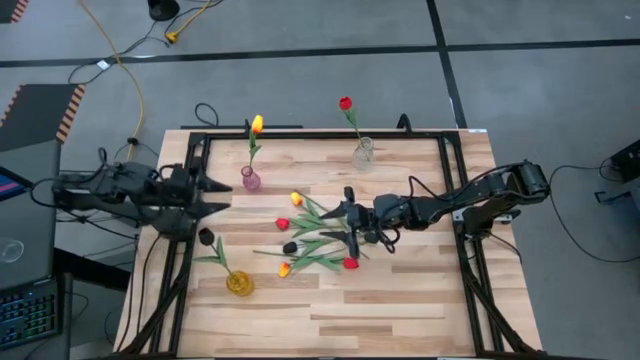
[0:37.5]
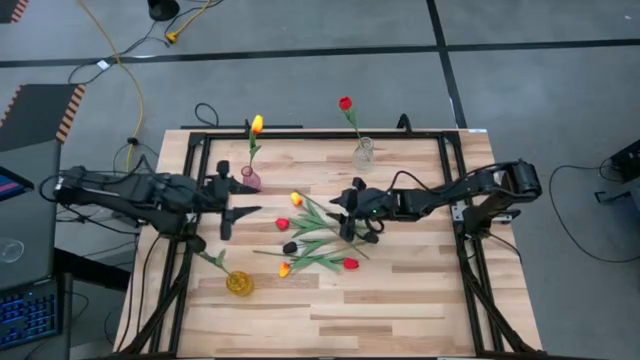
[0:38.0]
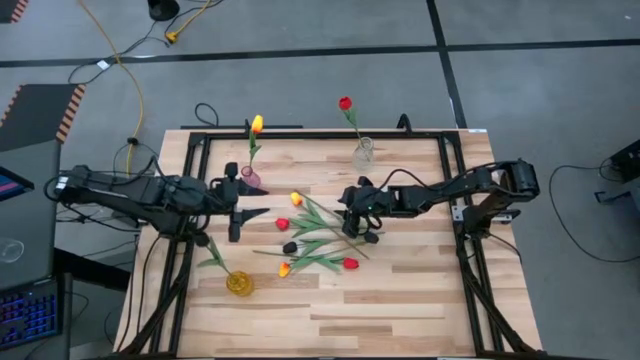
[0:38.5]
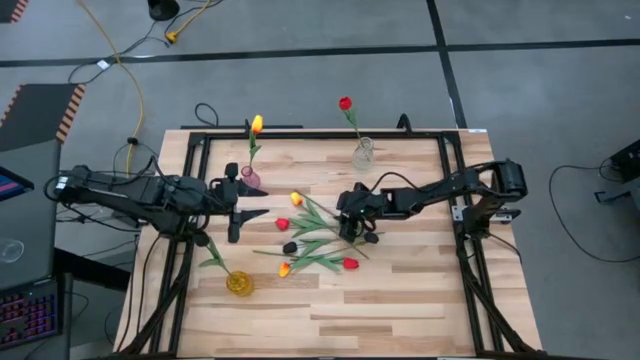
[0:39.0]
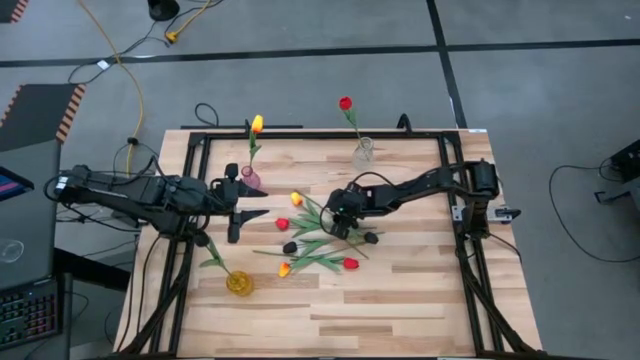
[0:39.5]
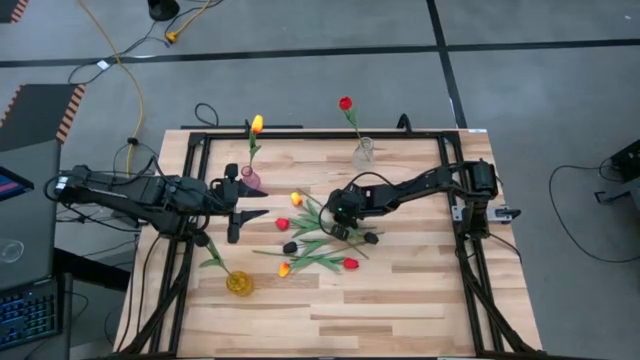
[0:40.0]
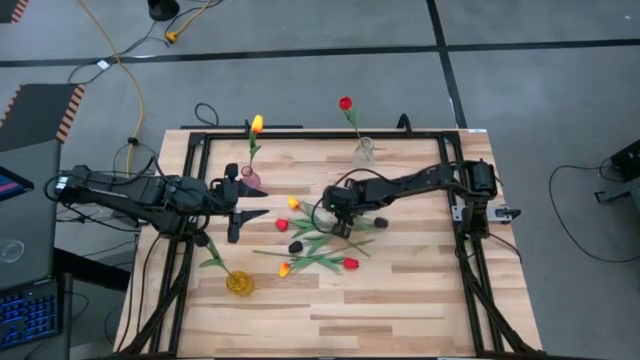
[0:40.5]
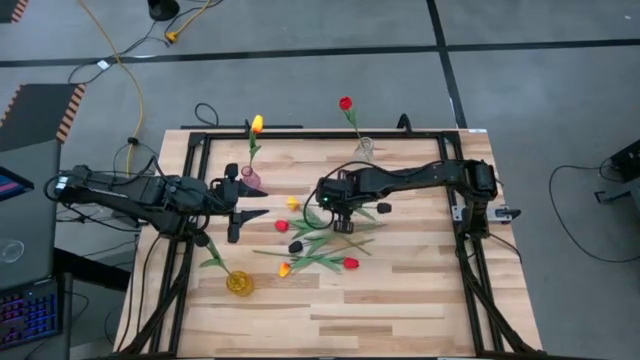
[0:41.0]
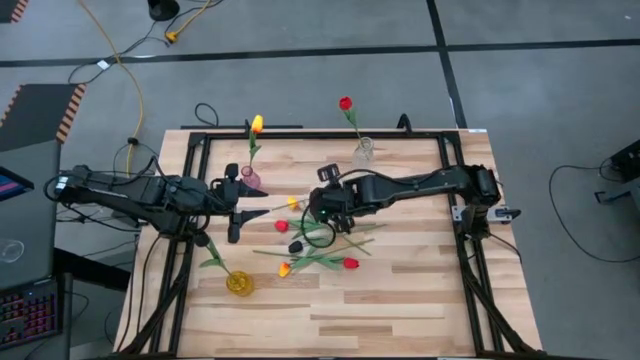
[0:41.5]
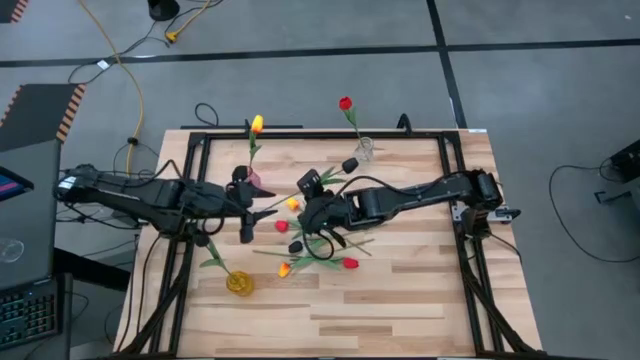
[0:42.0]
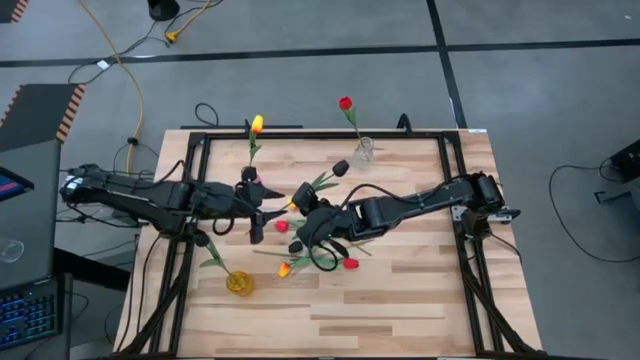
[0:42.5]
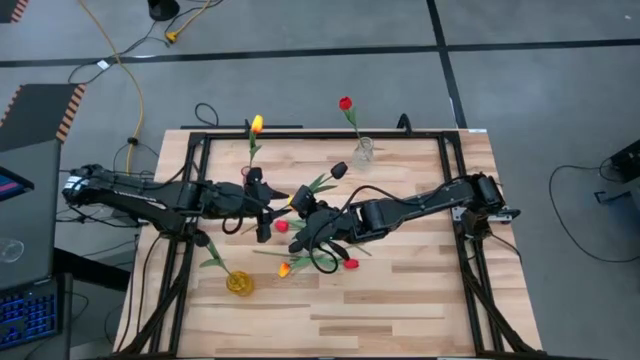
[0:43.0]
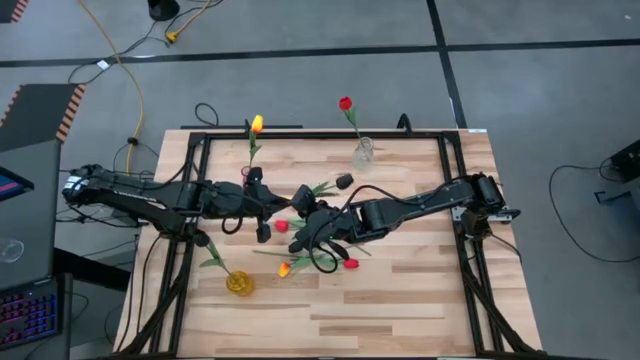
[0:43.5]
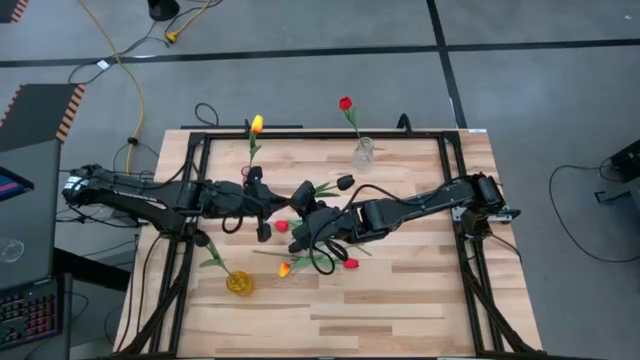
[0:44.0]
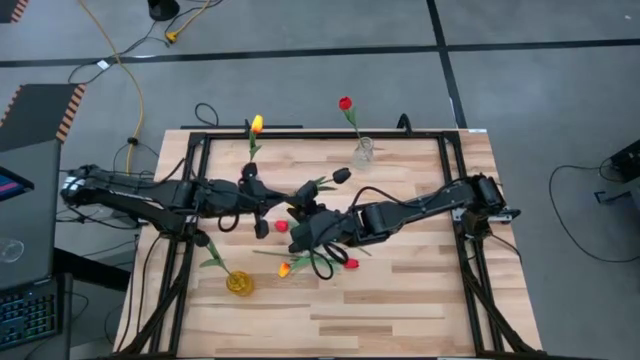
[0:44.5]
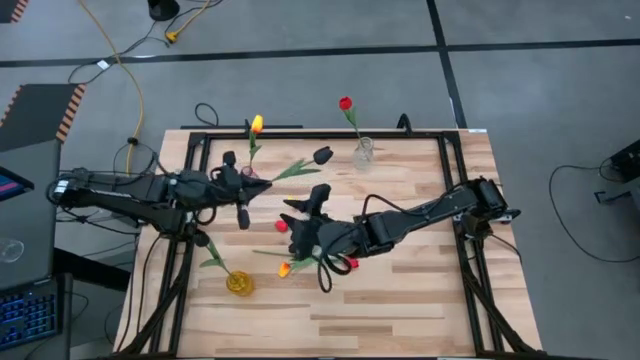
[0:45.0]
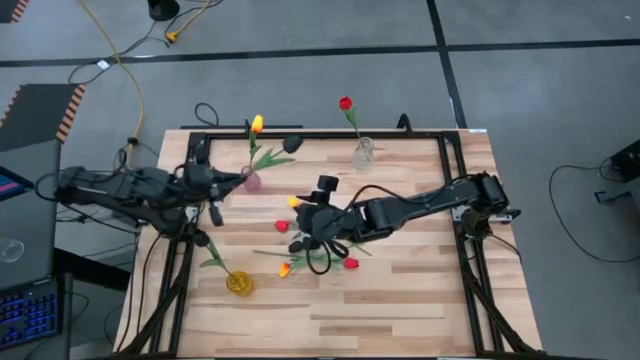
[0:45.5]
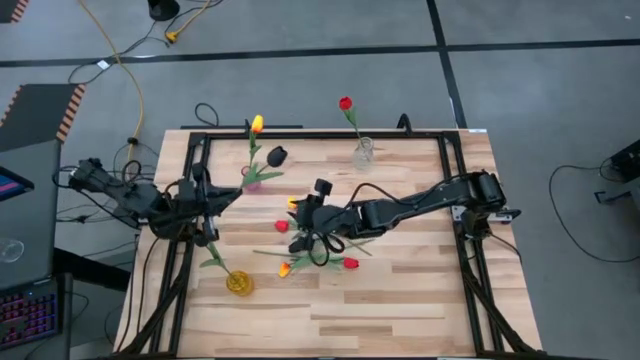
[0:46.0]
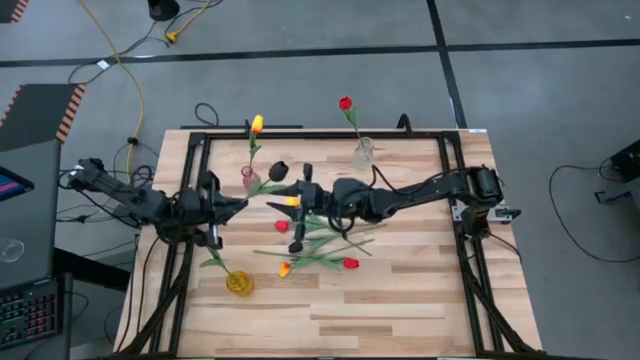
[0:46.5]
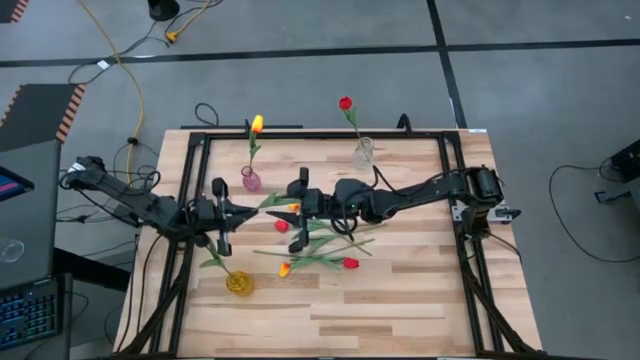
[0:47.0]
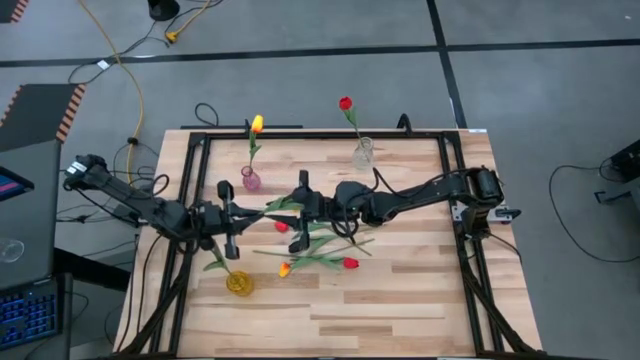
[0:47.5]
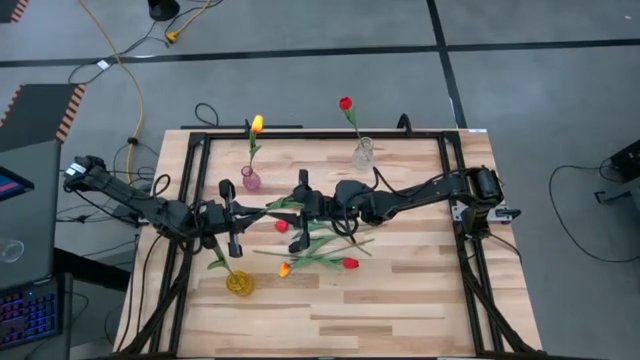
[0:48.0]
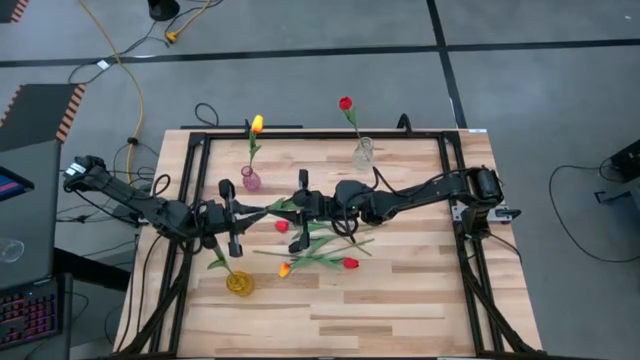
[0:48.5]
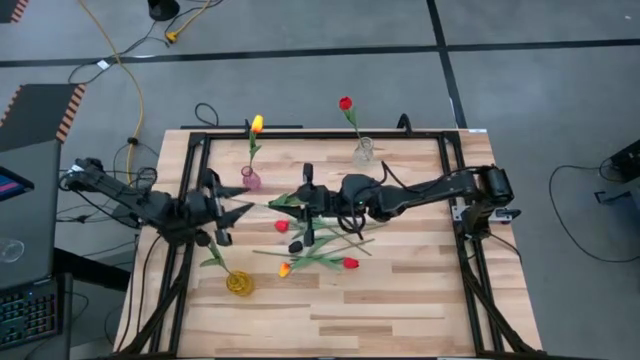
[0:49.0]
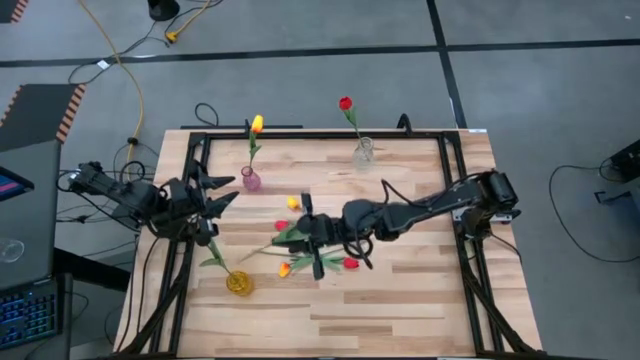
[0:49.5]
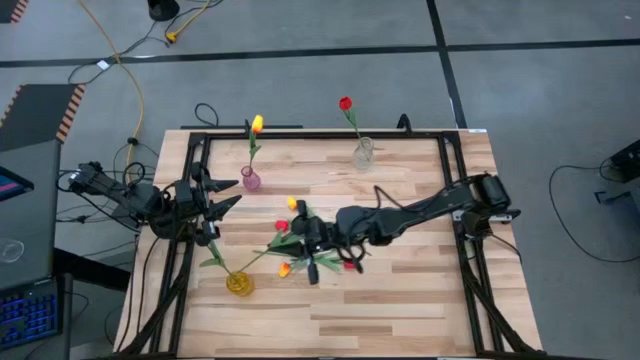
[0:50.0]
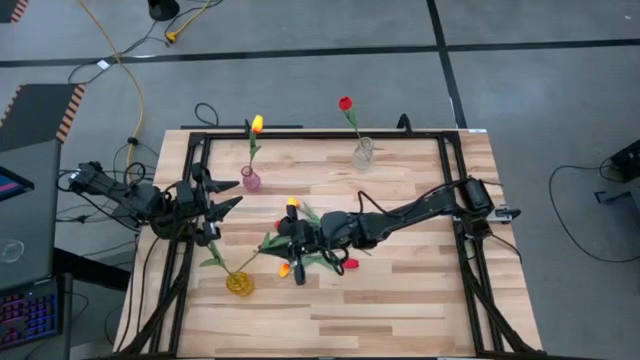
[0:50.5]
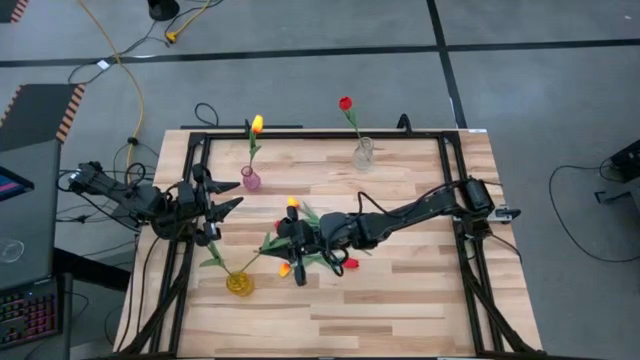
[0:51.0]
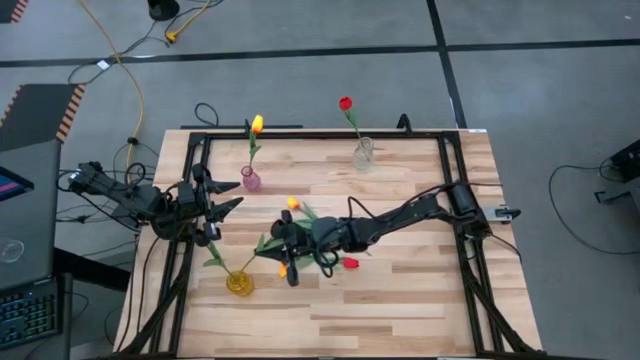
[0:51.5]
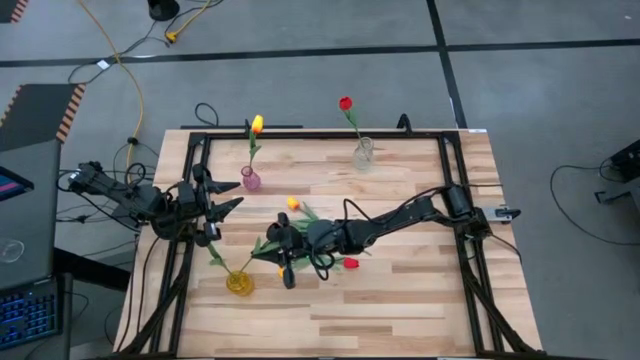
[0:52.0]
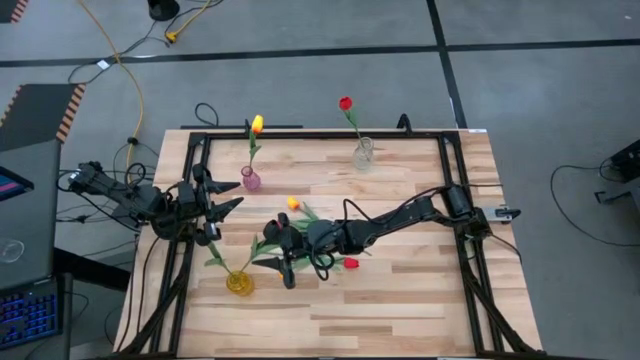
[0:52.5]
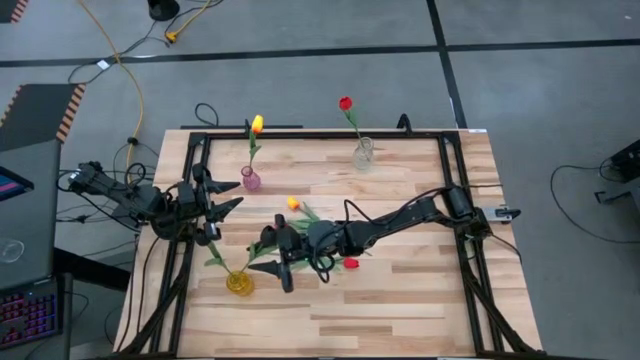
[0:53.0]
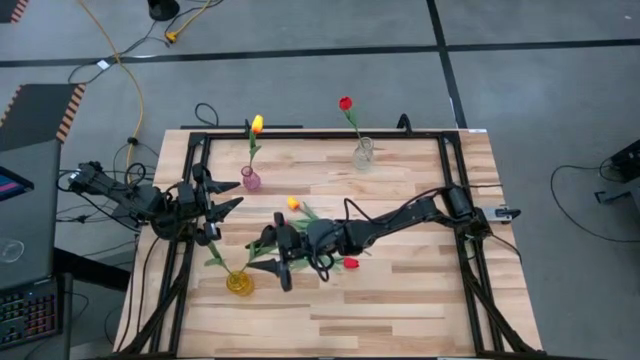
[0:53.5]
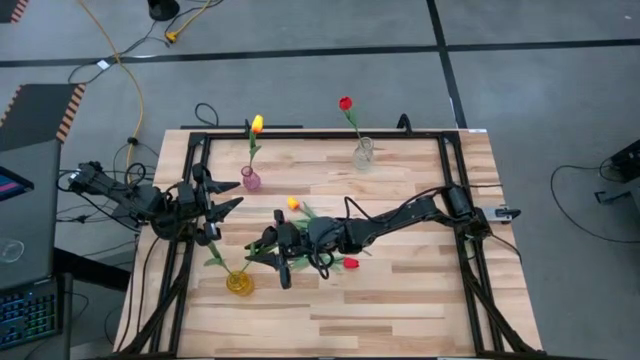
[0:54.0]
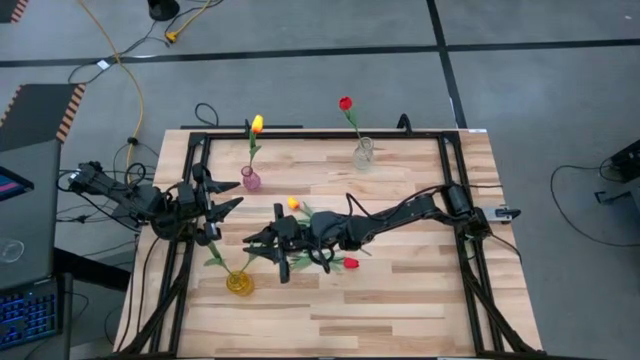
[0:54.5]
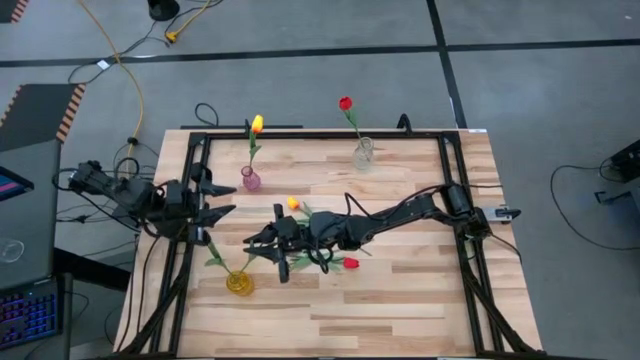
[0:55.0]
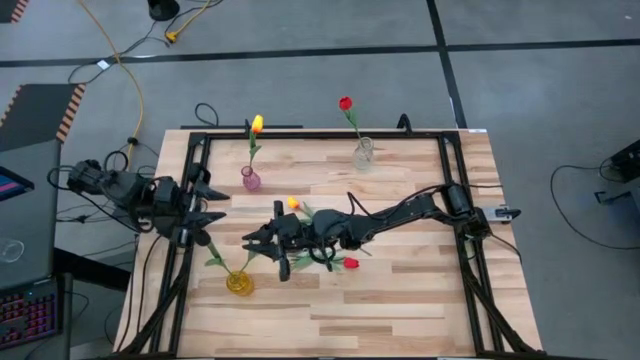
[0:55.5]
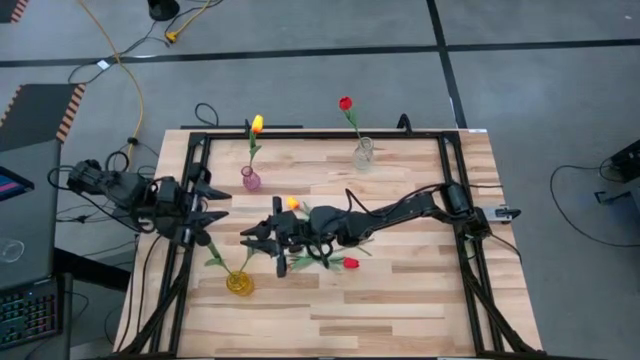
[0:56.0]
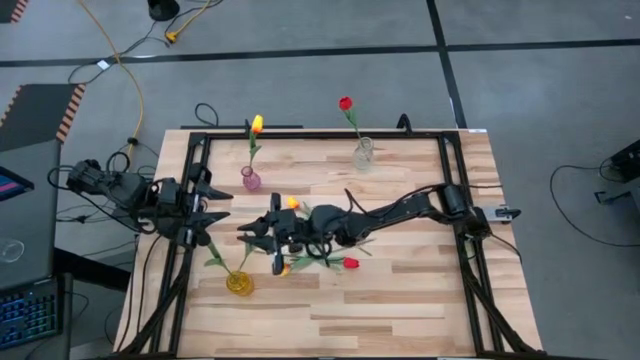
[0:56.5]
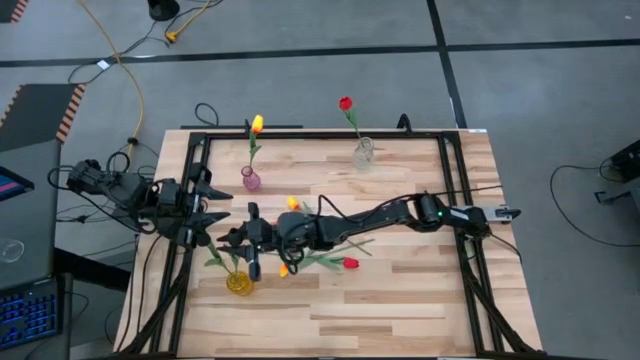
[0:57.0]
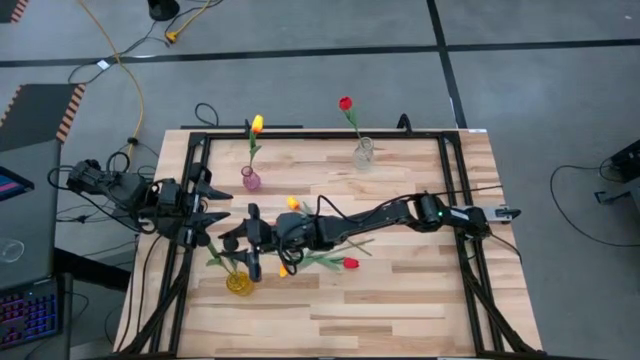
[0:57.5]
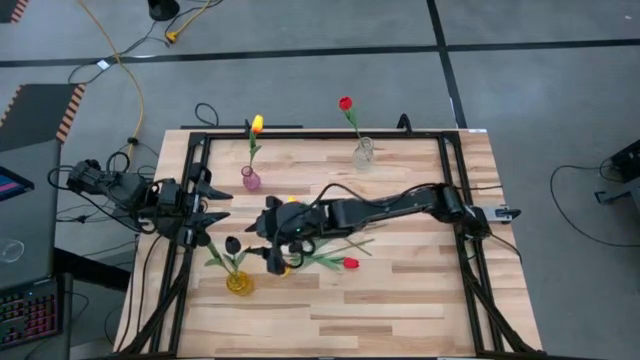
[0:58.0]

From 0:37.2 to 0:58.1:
Task: Sort flowers into vase by color
Put the right black tulip into the yellow vase
